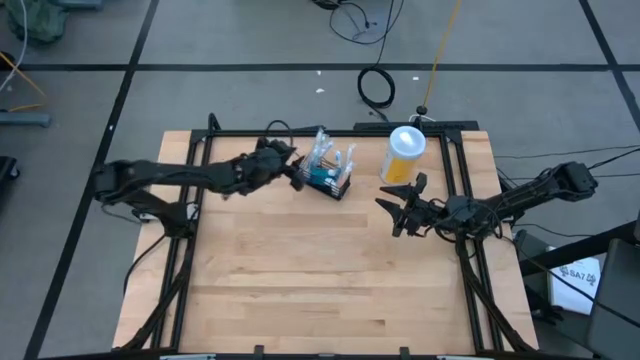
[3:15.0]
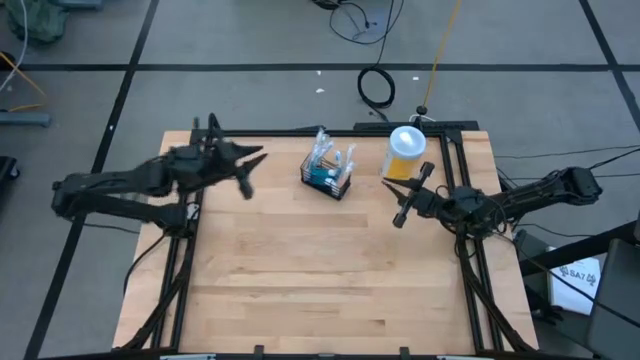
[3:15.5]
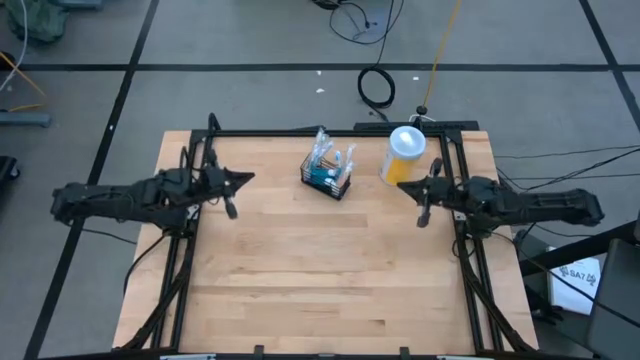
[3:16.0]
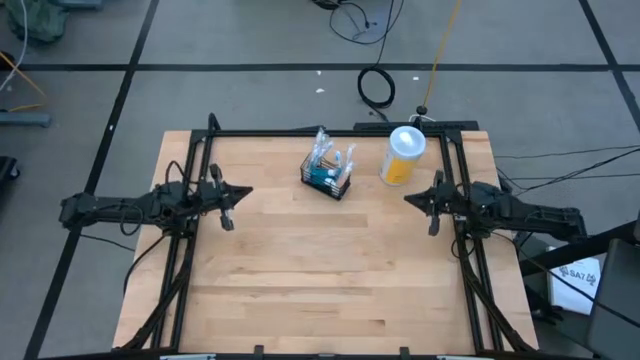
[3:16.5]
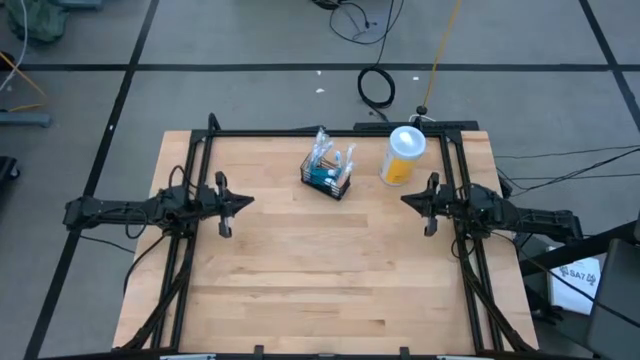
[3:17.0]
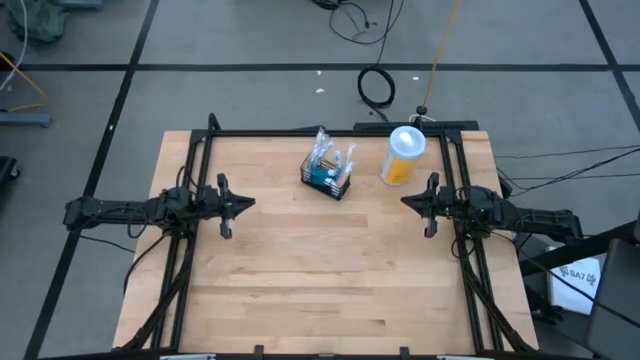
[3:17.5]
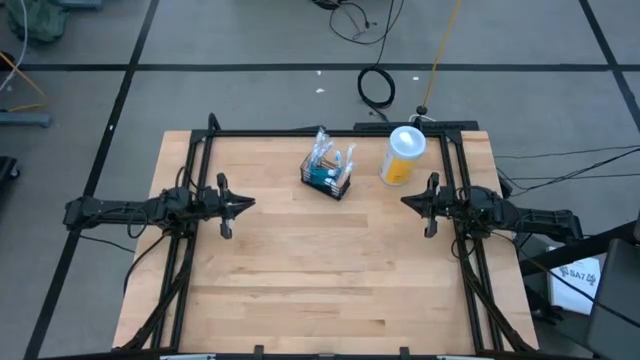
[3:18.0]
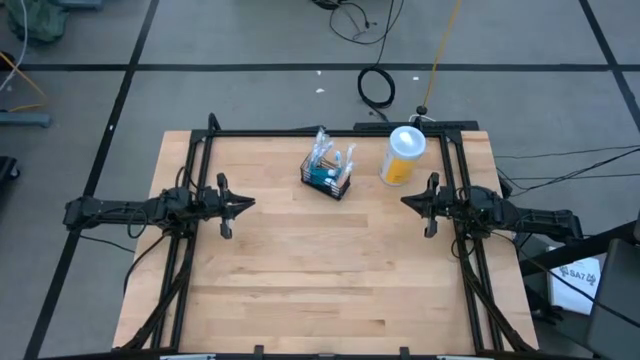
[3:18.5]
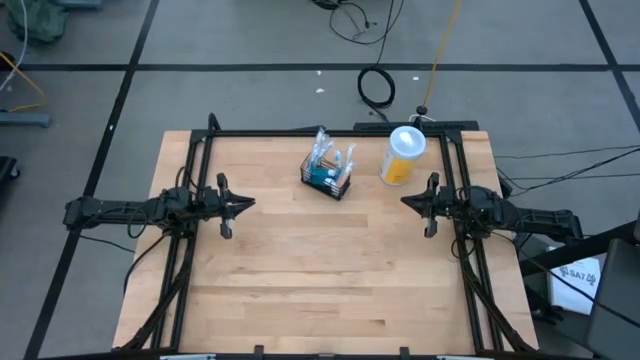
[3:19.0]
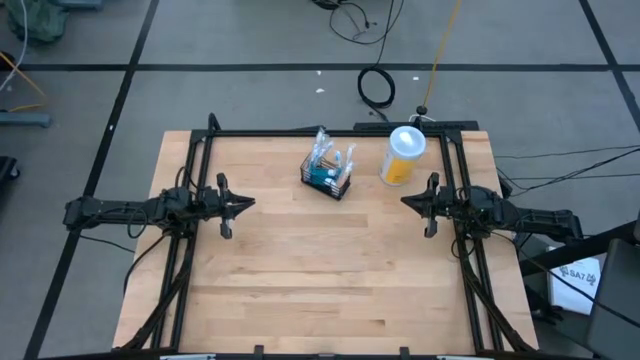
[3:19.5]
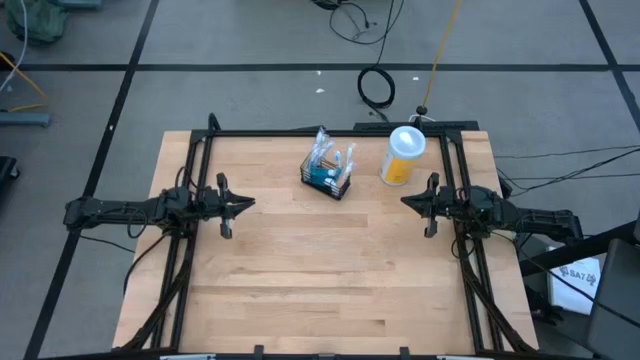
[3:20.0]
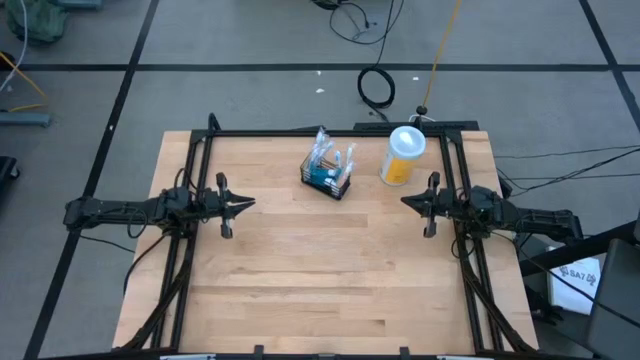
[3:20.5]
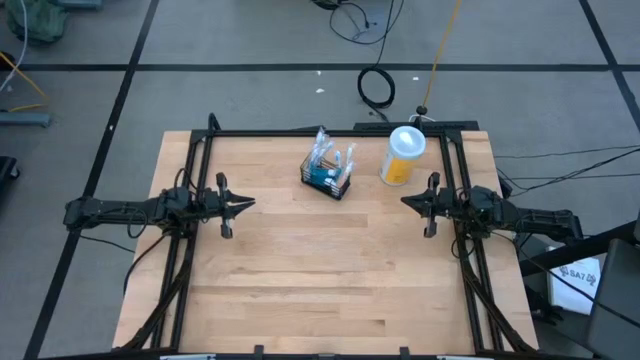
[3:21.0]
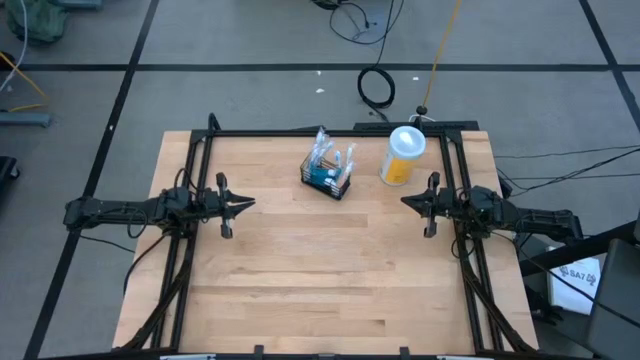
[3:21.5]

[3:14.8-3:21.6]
Task: Pick & Place toothbrushing station
Return to Home Position

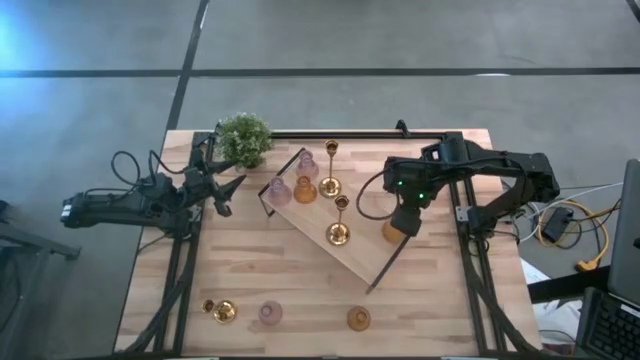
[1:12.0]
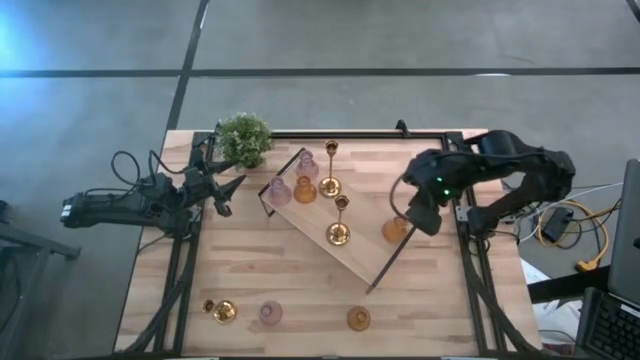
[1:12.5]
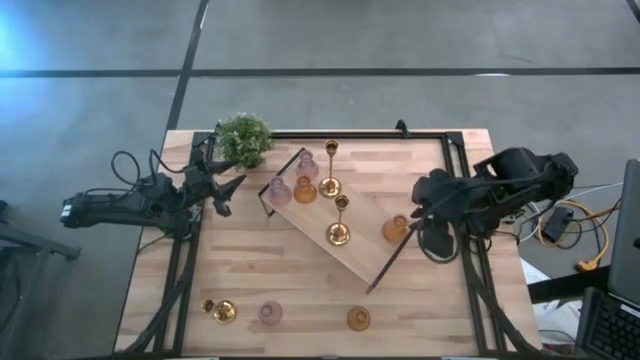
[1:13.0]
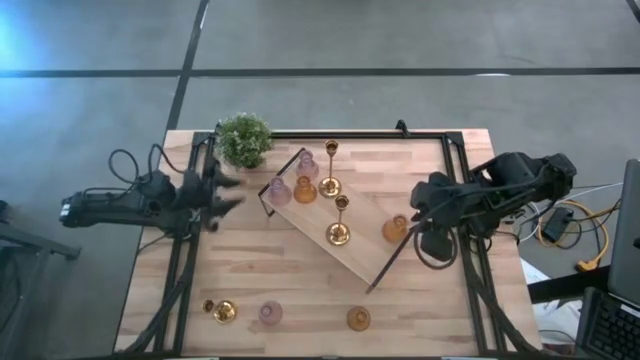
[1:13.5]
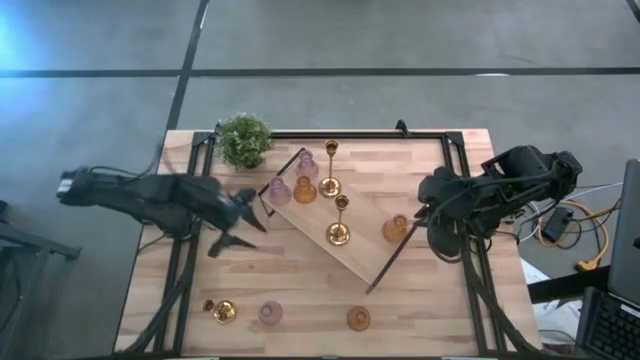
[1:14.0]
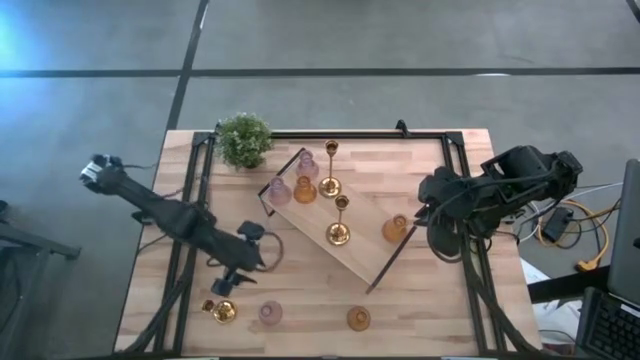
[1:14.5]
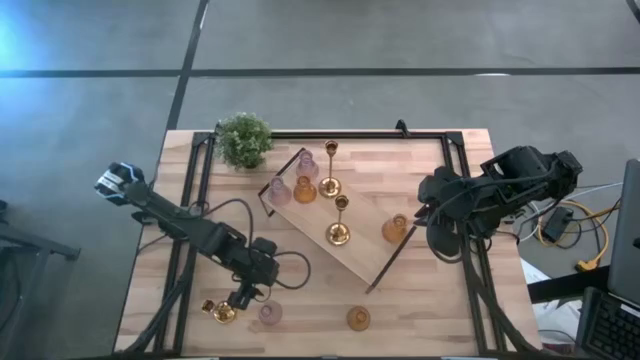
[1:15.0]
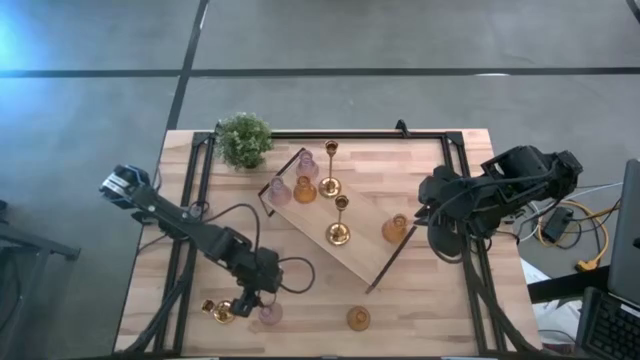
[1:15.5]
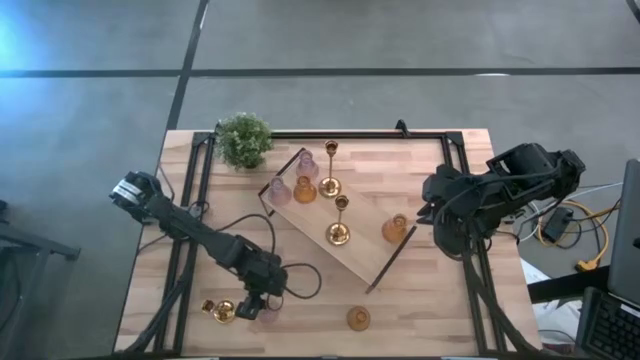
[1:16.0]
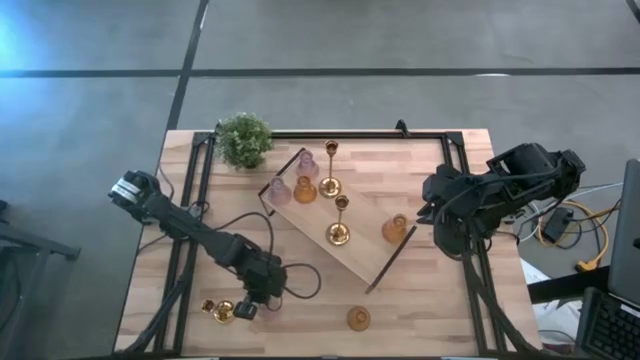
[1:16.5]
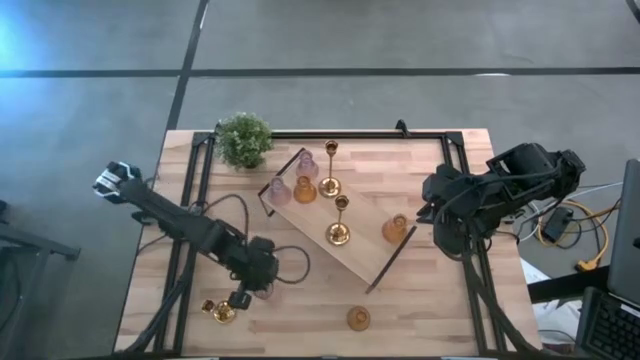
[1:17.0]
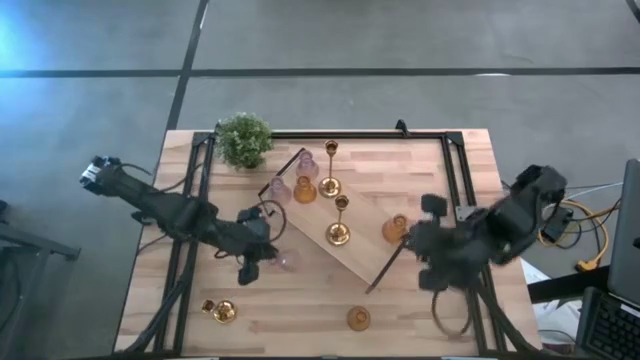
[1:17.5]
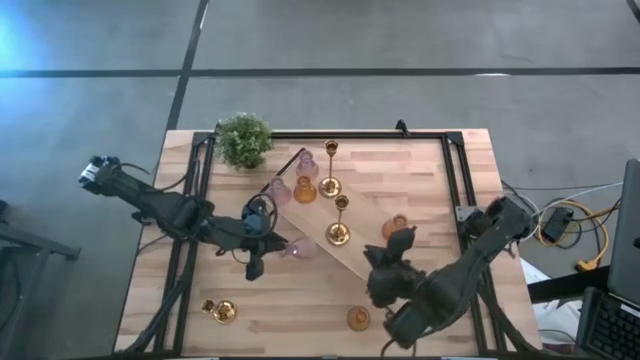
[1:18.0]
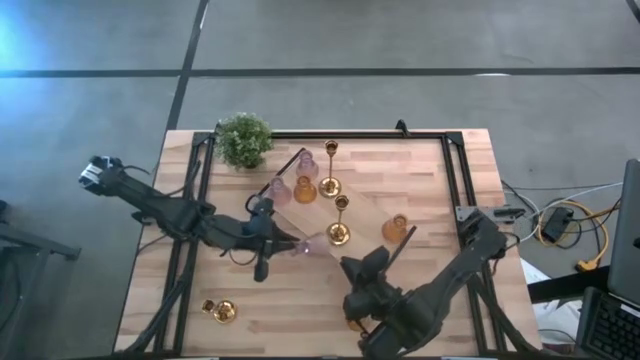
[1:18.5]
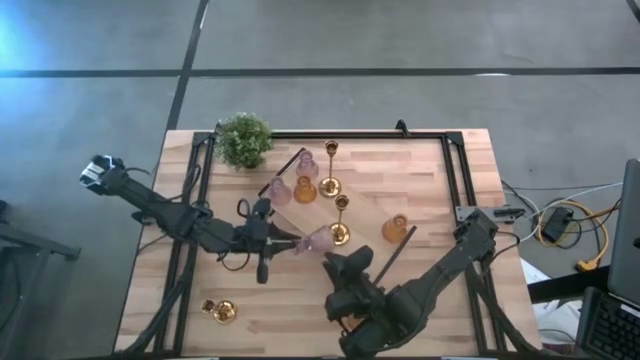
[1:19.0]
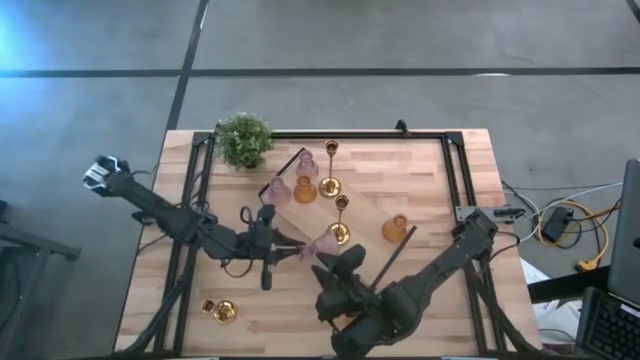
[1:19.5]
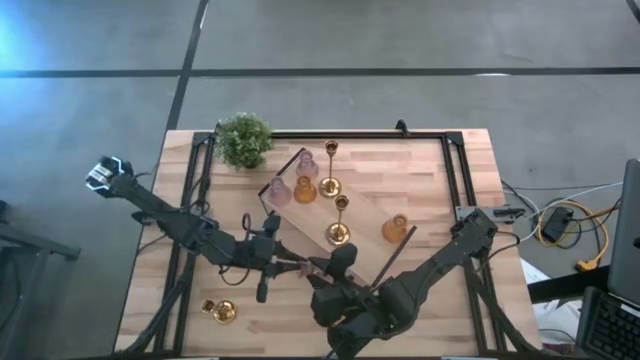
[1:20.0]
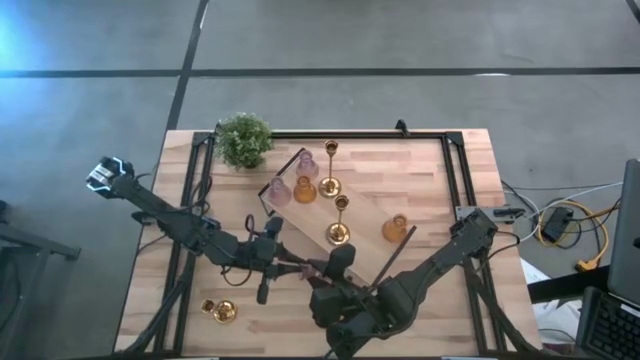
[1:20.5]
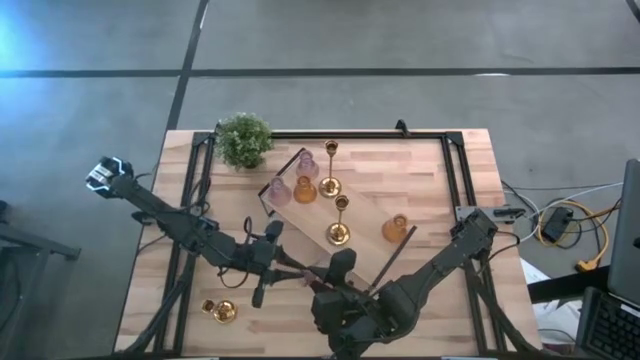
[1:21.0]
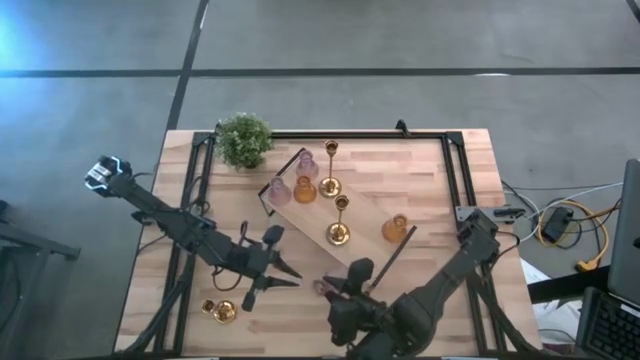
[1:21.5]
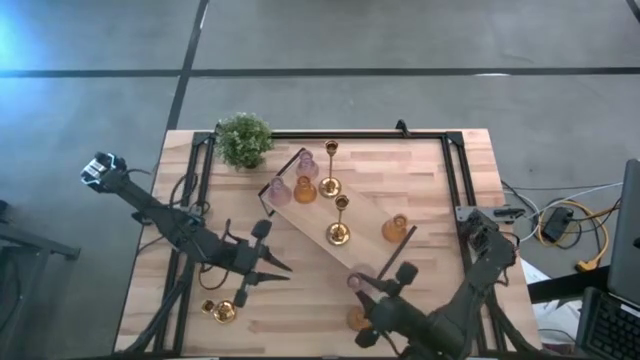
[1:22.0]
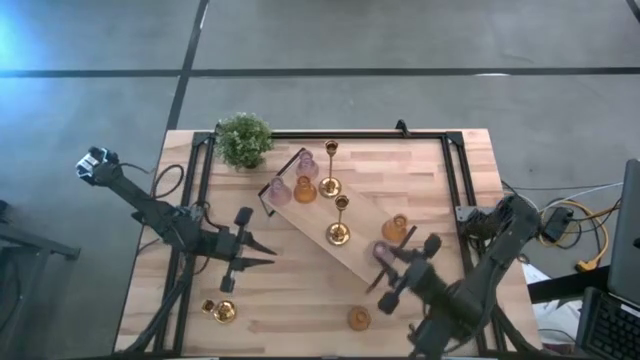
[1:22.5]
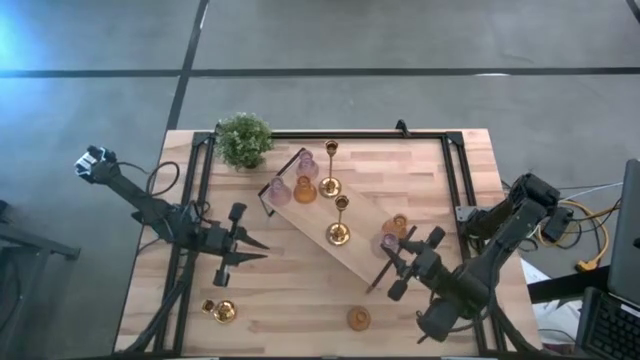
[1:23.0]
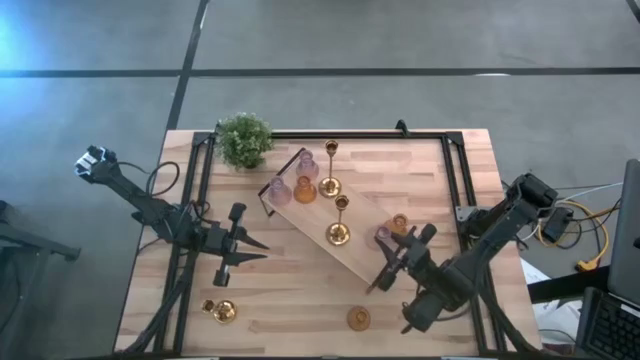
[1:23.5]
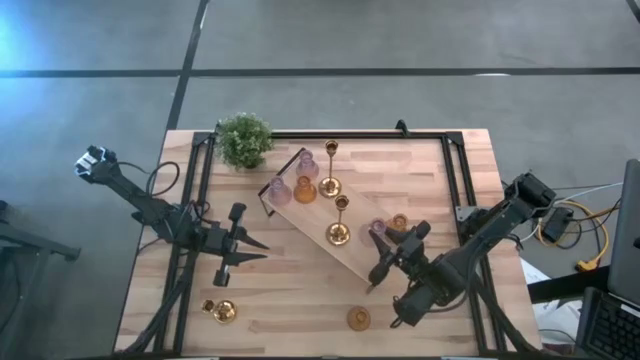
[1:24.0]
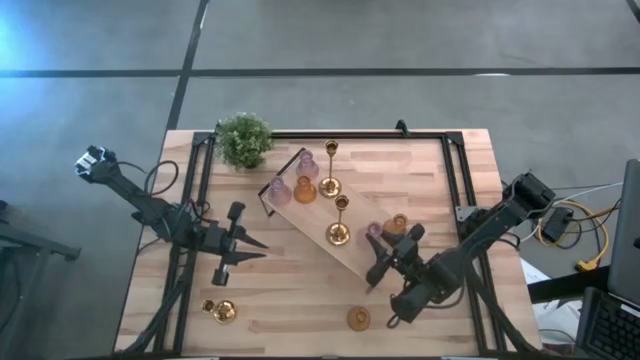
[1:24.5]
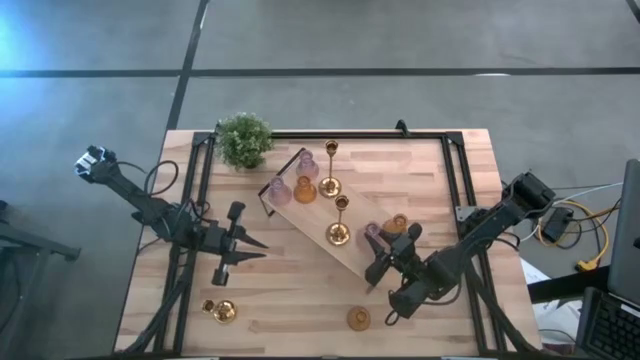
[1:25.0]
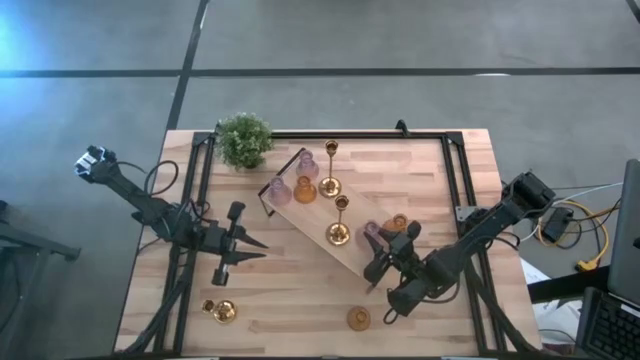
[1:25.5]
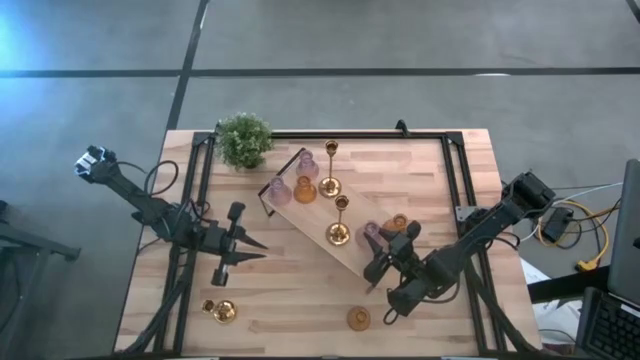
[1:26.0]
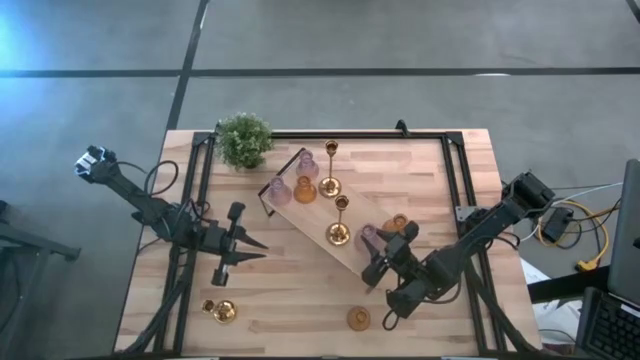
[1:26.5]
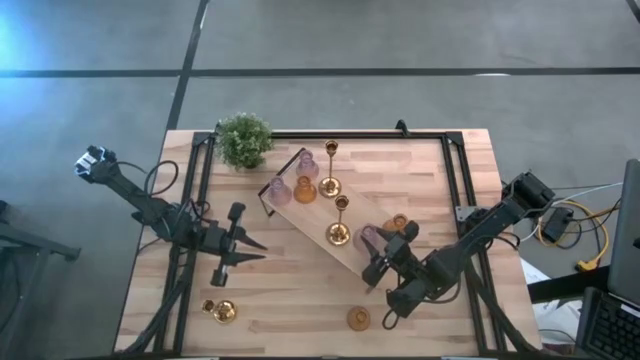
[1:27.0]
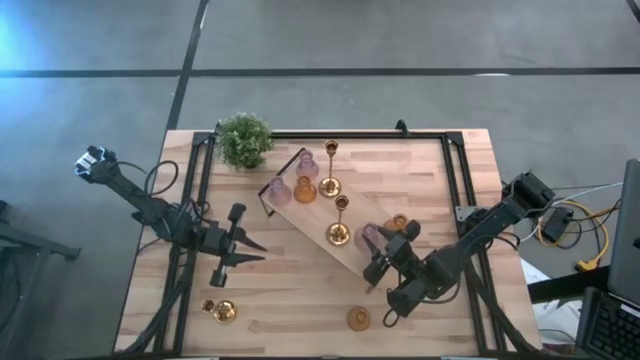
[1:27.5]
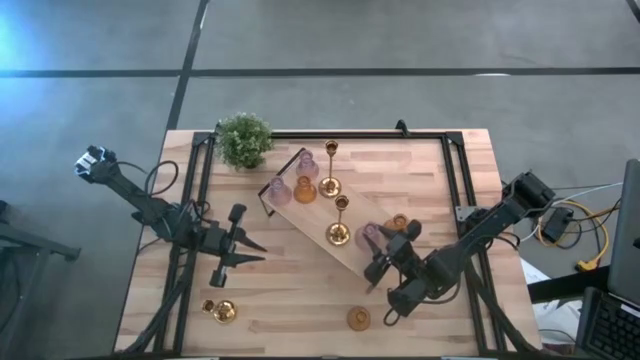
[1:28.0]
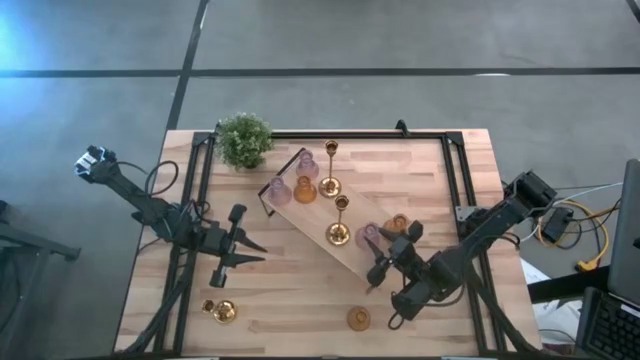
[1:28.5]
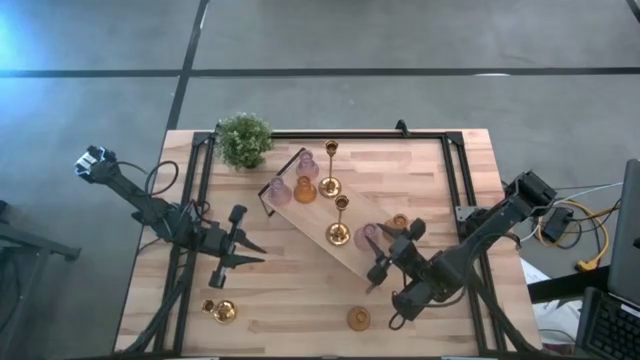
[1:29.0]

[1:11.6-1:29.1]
Task: Pick & Place candle stick holders
Put the pink candle holder on the shelf
